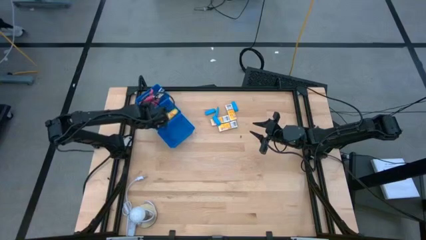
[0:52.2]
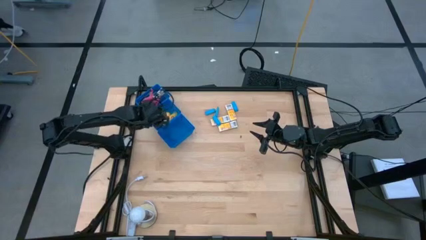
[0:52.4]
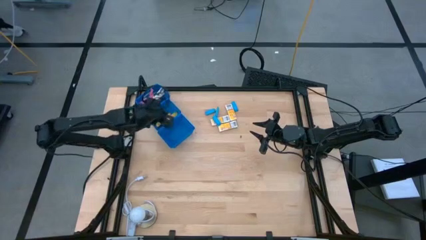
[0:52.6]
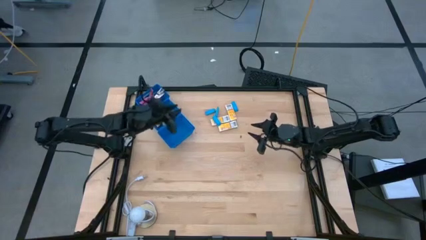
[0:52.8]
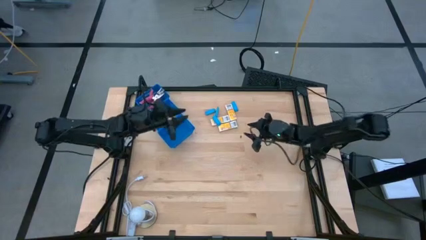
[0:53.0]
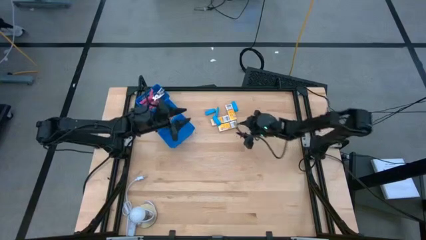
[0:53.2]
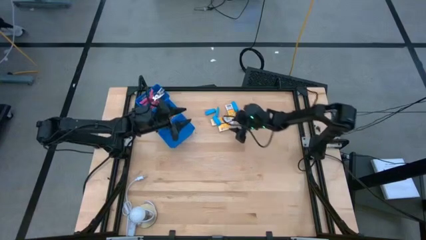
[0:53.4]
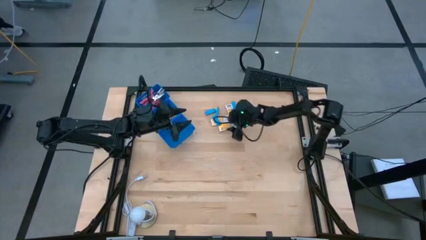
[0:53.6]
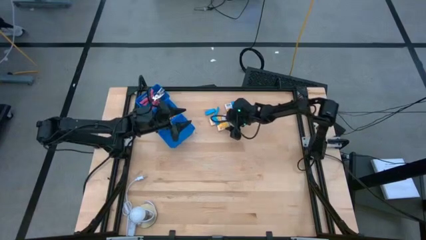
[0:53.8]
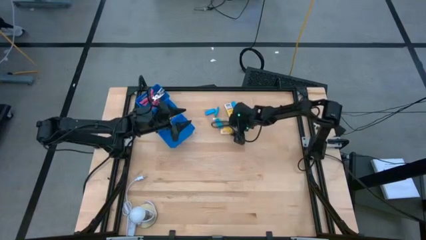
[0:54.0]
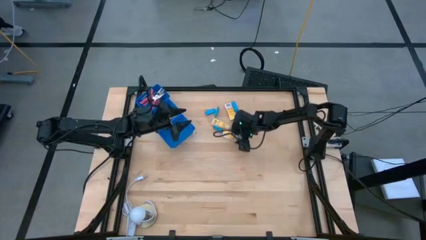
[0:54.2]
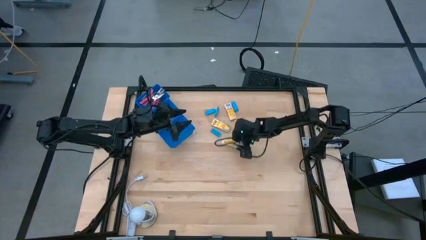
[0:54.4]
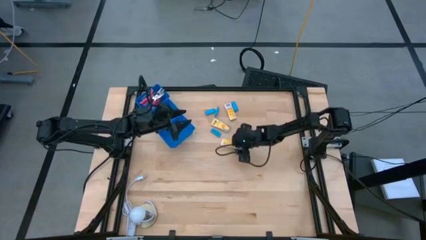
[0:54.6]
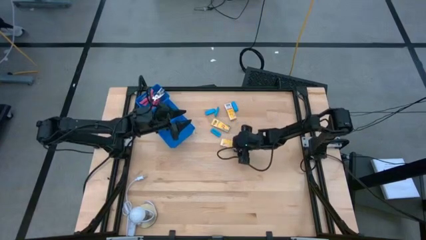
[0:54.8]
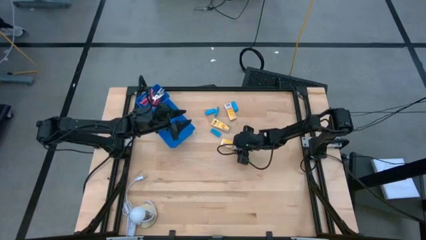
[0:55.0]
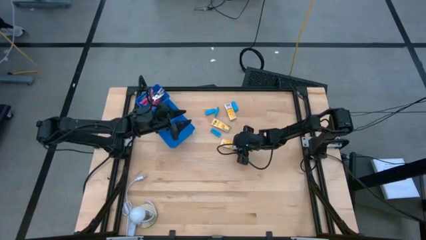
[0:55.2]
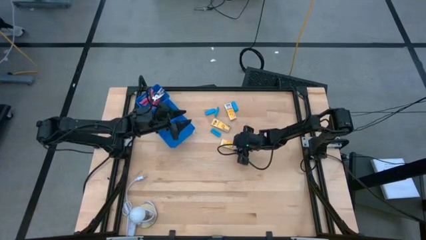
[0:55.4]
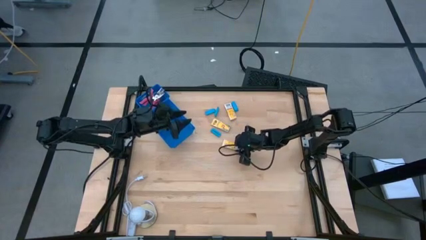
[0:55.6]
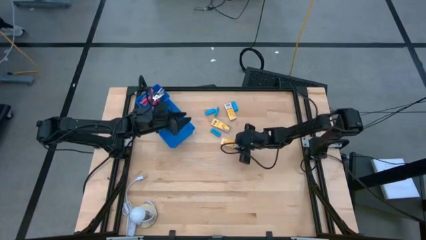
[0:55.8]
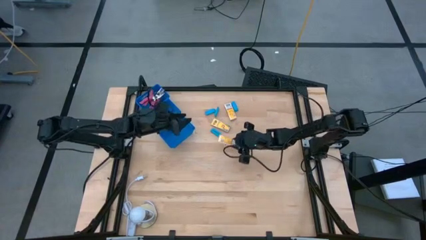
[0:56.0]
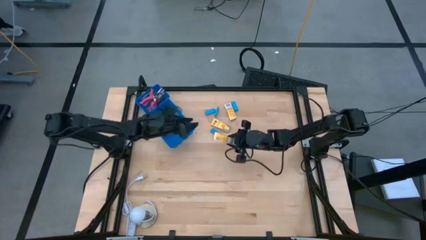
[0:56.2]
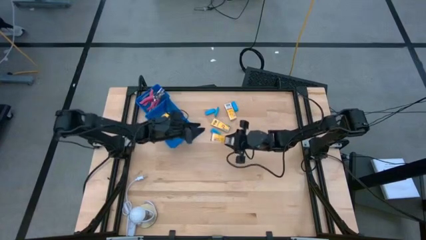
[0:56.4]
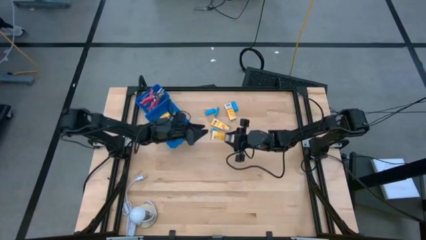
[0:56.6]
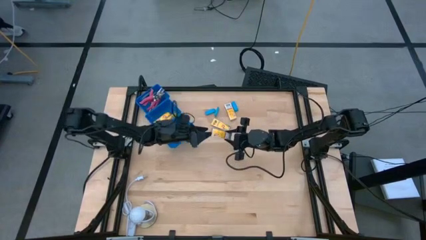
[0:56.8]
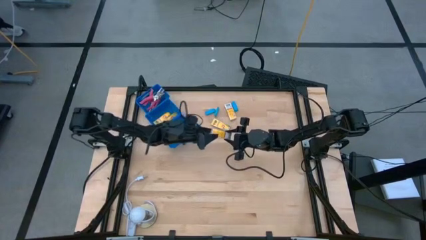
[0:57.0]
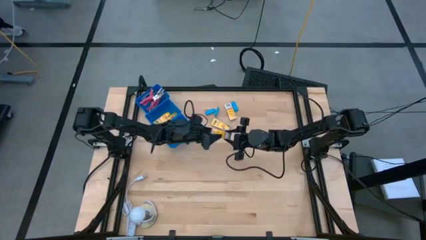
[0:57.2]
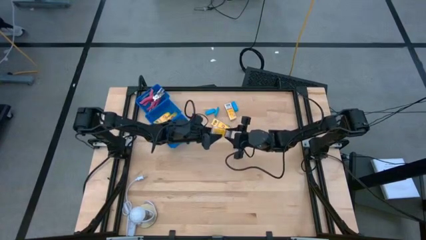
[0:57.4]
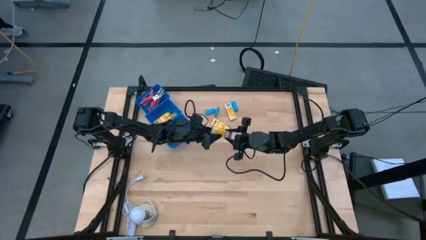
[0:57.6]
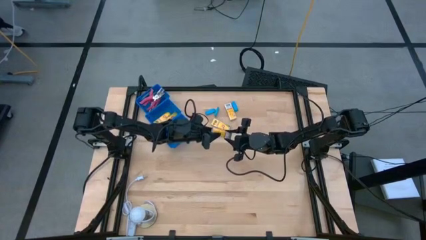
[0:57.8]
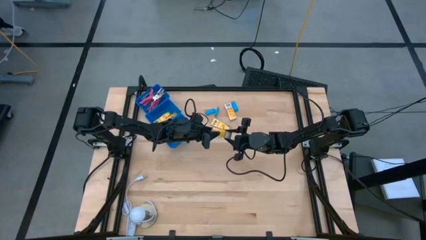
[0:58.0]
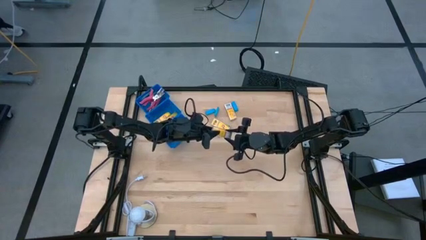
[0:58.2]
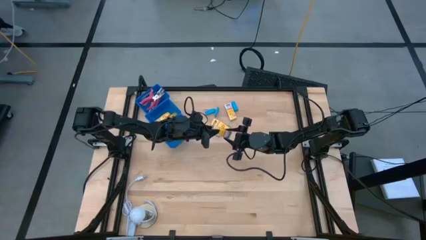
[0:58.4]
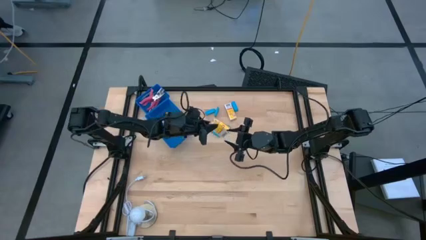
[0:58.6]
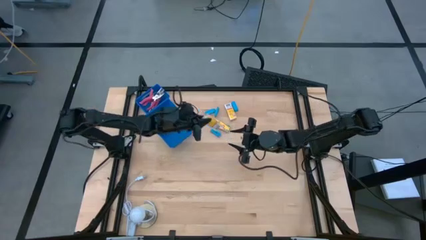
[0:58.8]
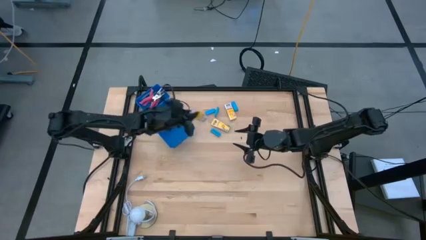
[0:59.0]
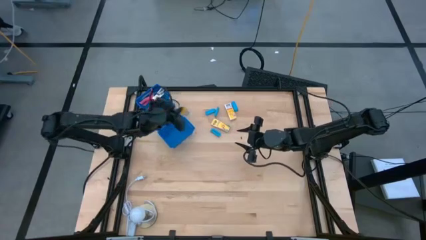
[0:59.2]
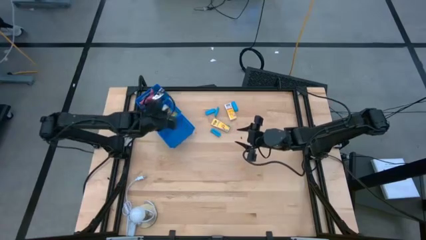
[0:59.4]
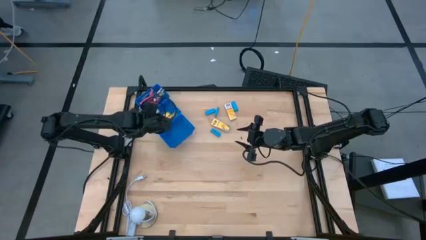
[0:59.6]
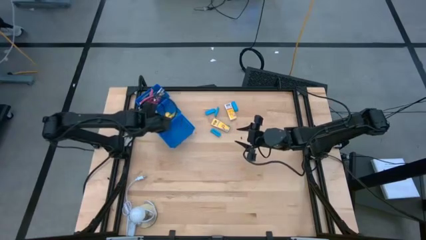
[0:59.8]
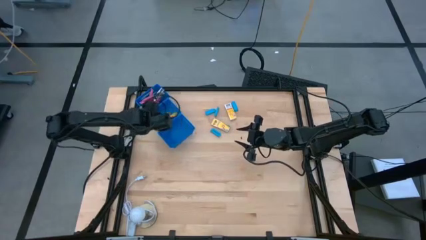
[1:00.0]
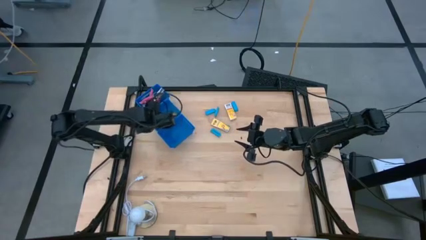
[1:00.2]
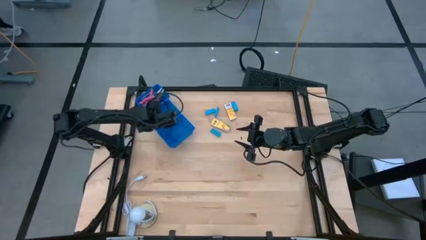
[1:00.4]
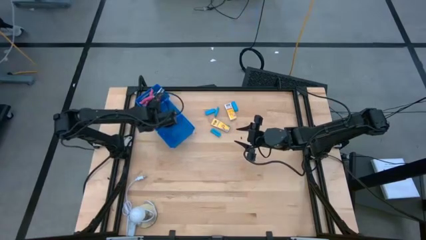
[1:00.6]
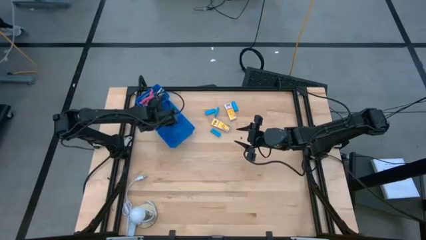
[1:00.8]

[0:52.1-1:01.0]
Task: Pick & Place School Supplies
Put the yellow crayon box into the middle blue bin

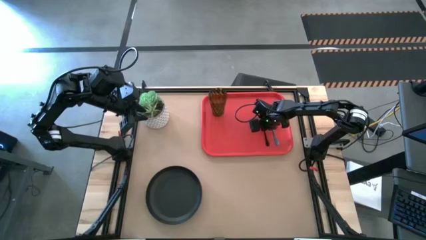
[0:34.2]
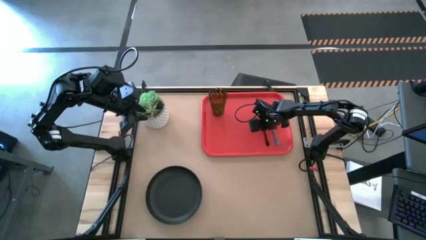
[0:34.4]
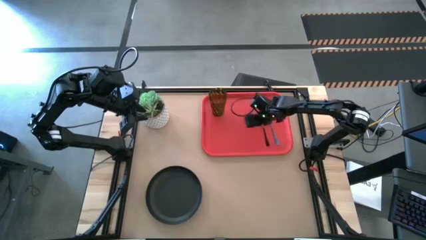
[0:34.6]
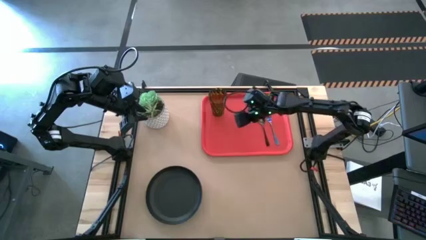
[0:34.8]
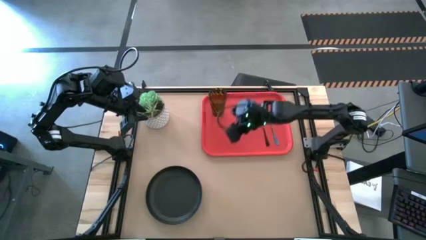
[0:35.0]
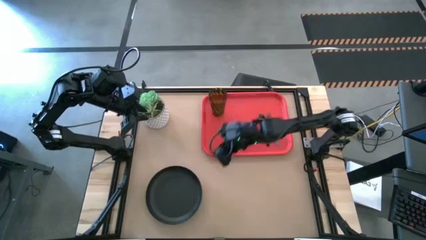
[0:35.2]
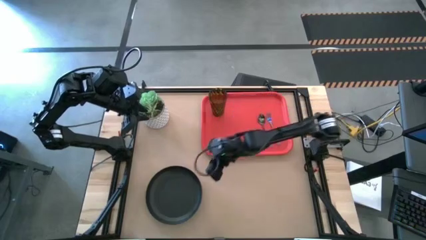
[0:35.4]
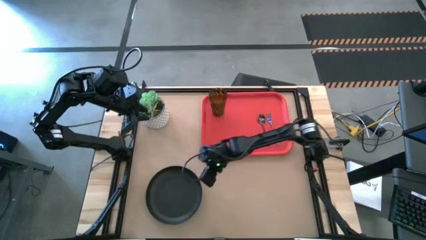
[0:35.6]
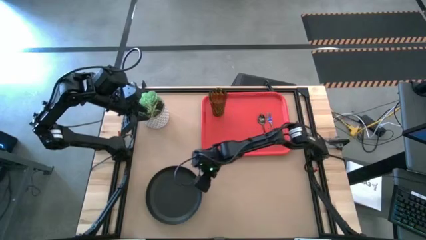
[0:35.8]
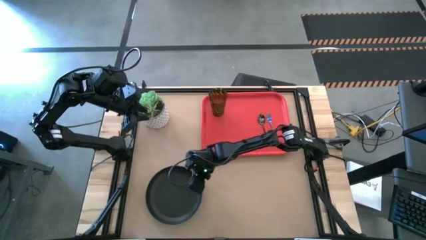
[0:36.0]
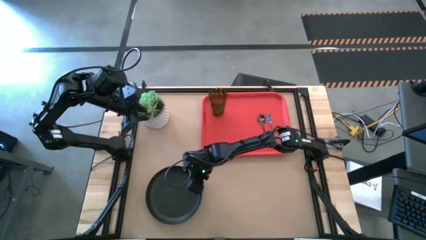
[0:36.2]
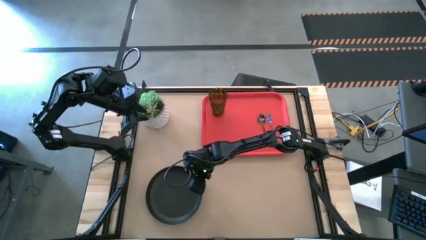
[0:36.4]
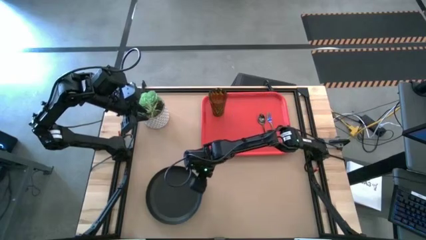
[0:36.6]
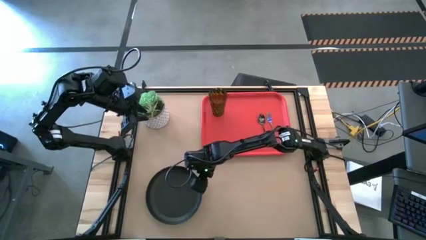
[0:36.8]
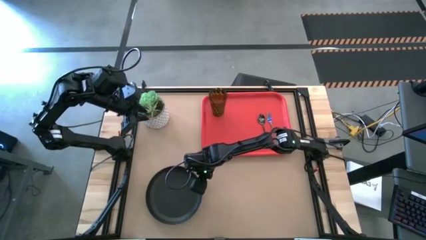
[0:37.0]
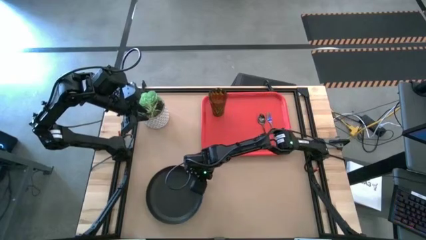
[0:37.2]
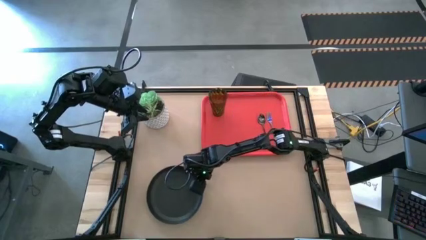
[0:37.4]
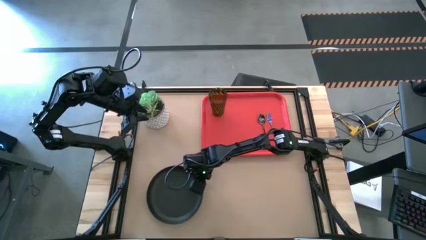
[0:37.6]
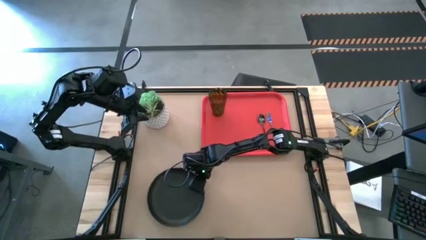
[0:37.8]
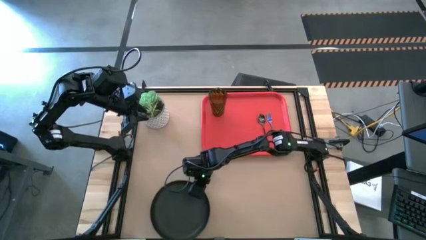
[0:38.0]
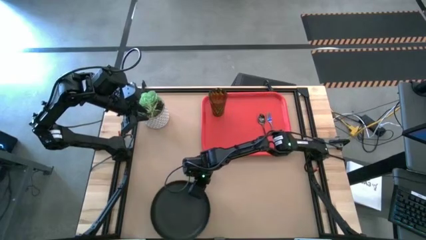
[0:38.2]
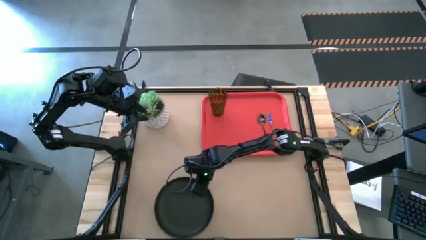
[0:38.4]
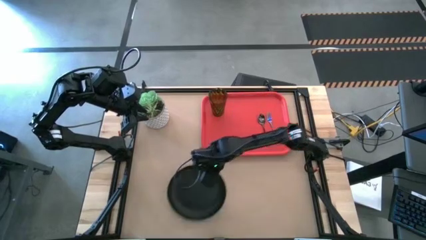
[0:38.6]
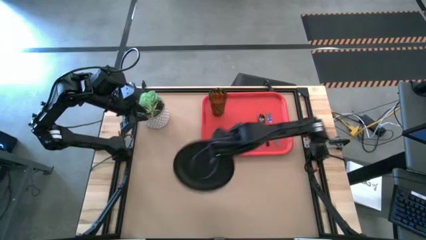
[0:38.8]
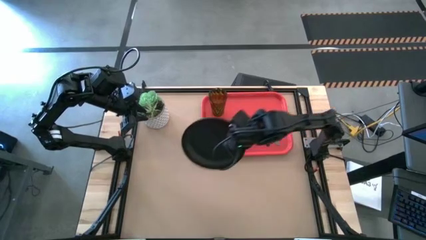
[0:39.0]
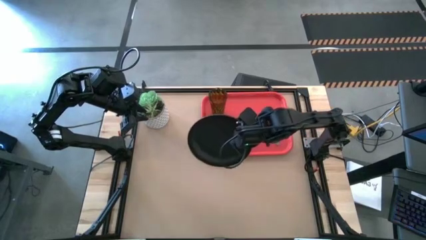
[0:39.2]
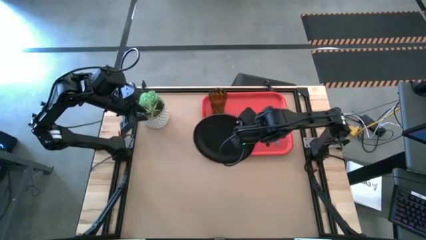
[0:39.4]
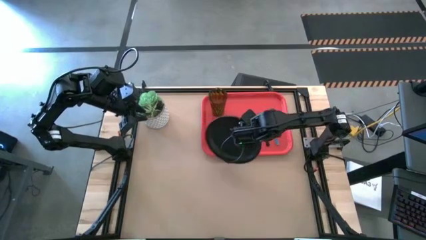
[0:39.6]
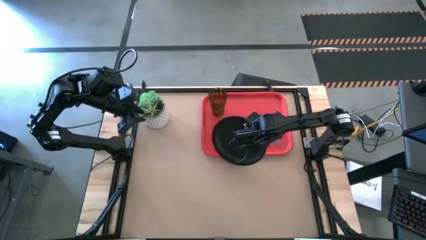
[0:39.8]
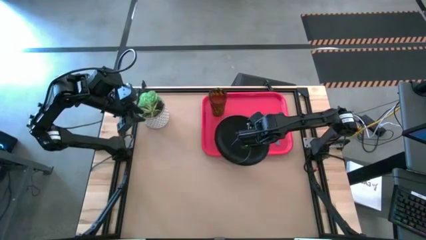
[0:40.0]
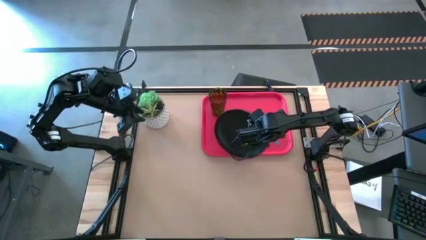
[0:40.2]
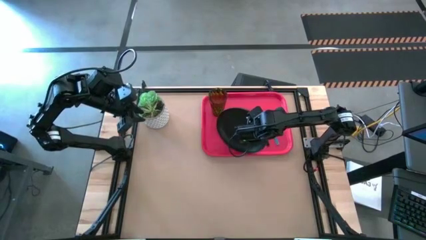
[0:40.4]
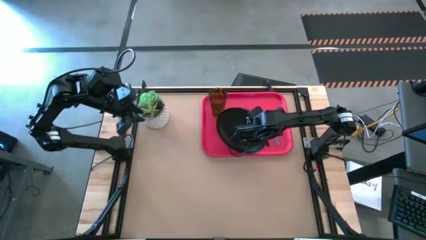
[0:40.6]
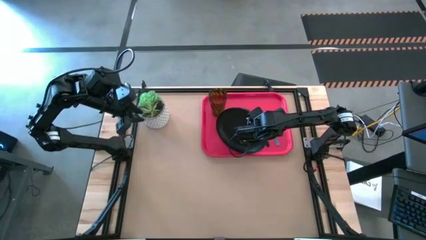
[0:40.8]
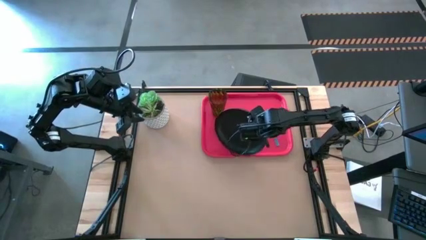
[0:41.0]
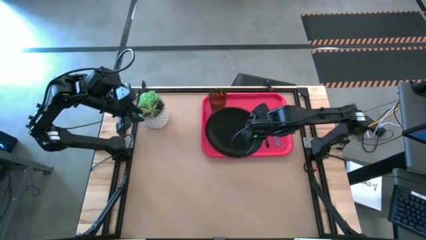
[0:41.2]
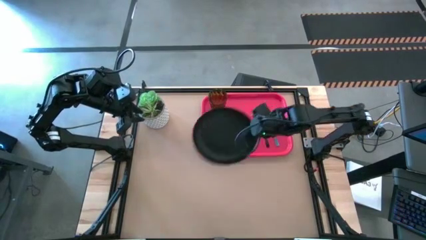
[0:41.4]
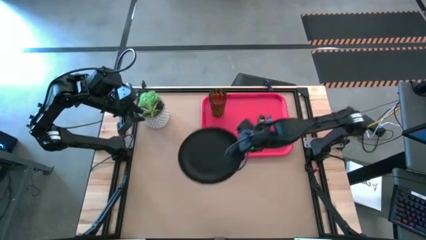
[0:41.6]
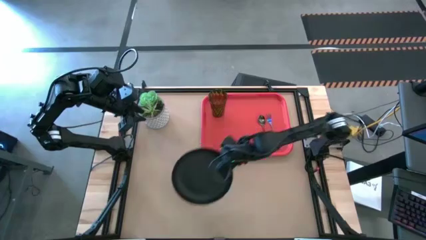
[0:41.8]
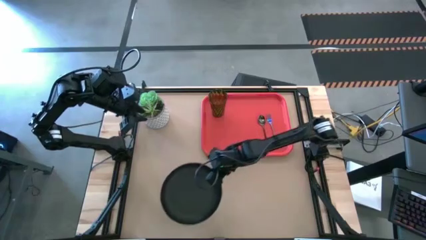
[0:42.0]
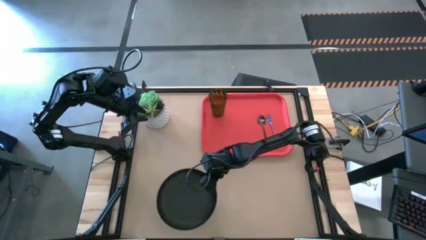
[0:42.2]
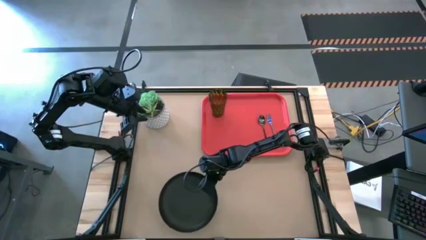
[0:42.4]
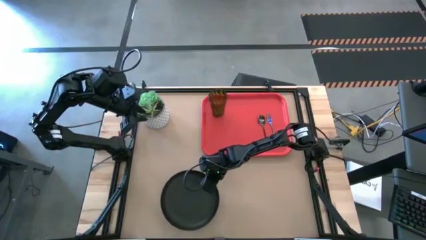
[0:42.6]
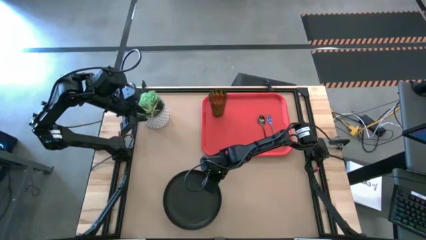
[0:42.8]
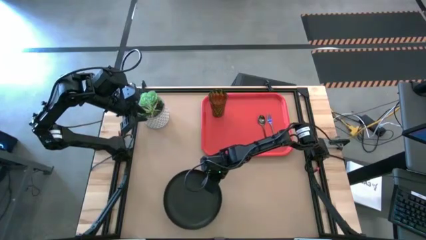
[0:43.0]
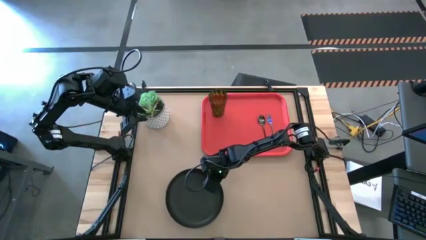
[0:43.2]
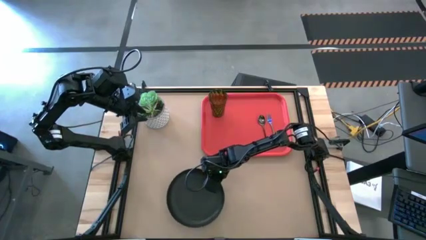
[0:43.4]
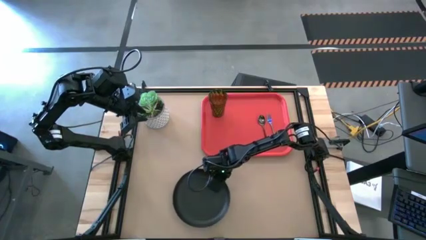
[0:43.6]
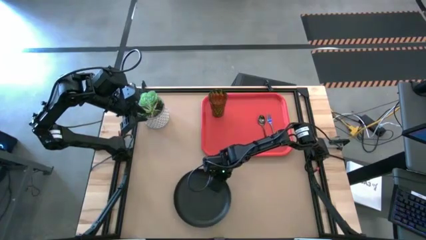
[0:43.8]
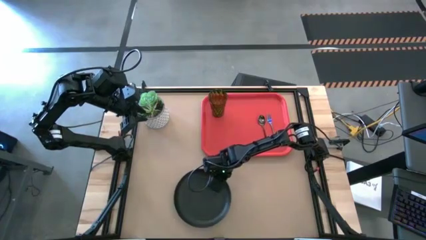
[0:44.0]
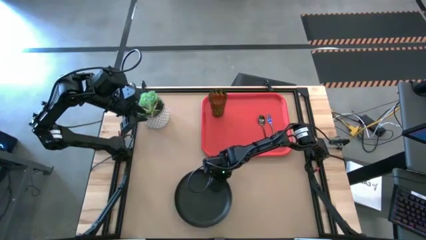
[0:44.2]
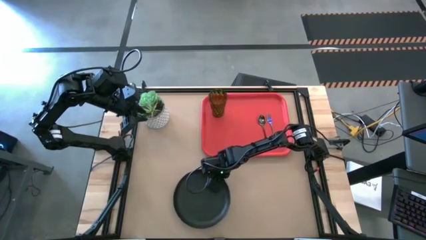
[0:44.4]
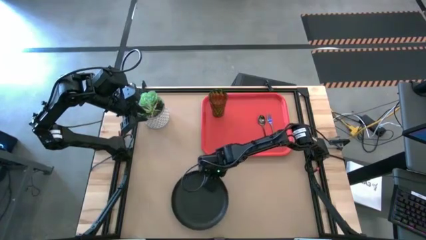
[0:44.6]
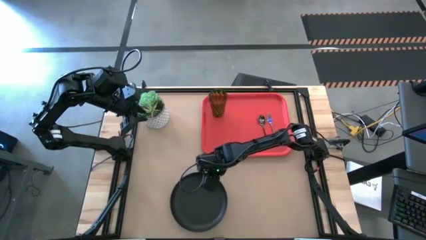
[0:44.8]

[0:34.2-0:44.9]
Task: Pick and place plate/cup/fork/spoon on tray
Put the black plate into the red tray
